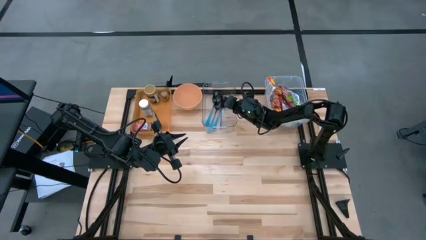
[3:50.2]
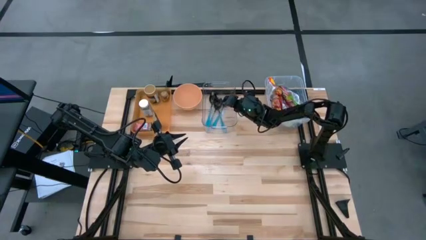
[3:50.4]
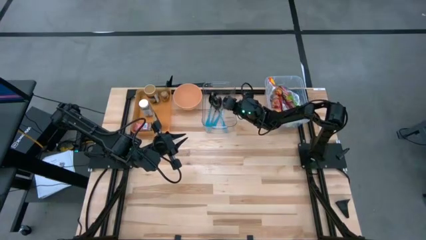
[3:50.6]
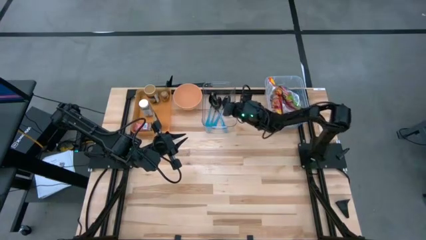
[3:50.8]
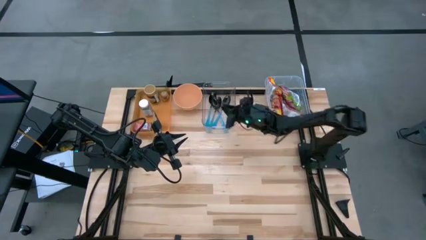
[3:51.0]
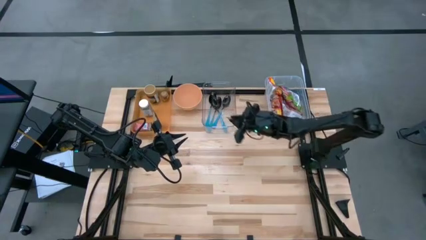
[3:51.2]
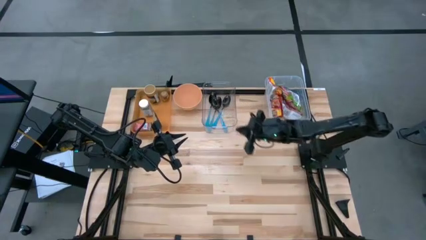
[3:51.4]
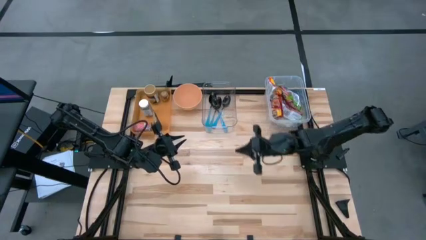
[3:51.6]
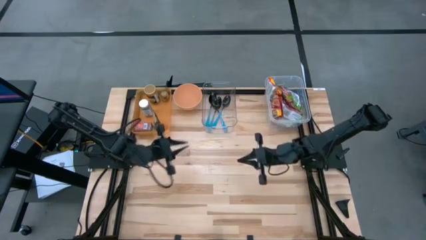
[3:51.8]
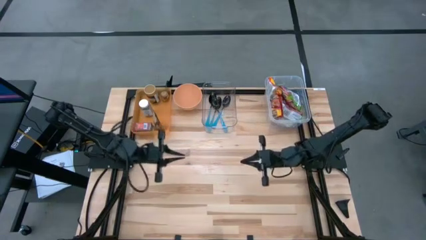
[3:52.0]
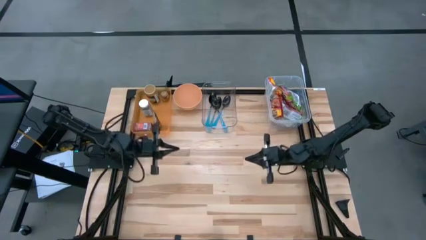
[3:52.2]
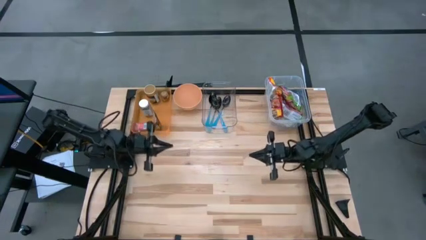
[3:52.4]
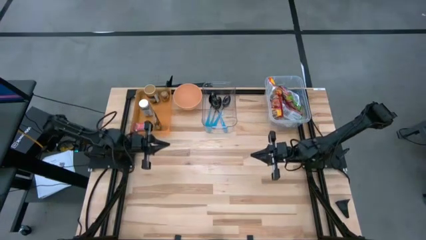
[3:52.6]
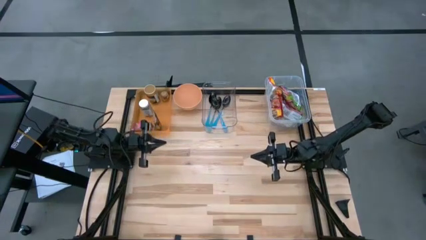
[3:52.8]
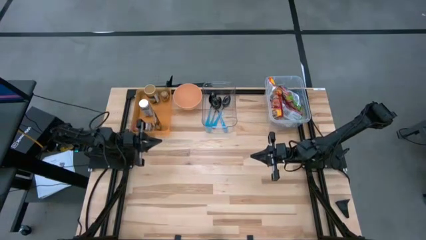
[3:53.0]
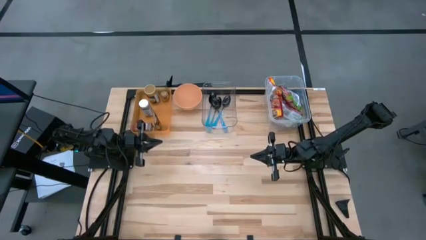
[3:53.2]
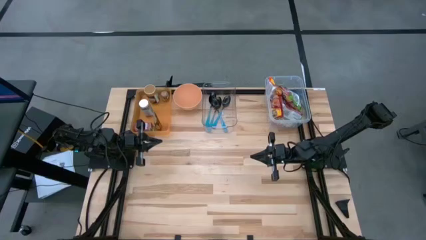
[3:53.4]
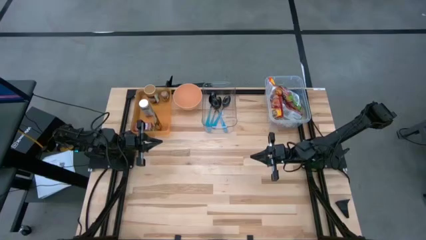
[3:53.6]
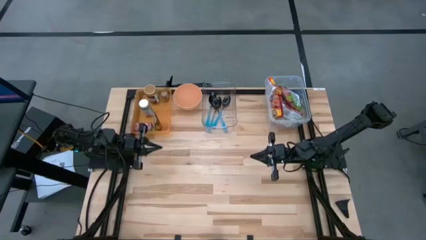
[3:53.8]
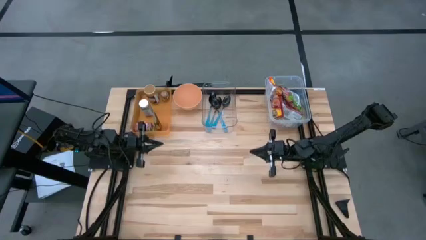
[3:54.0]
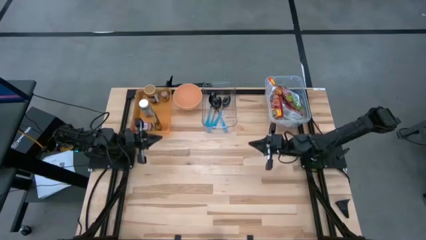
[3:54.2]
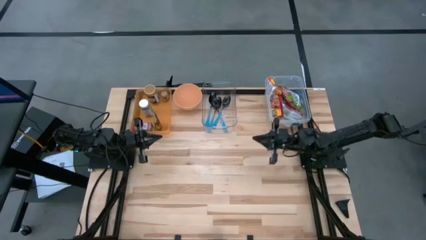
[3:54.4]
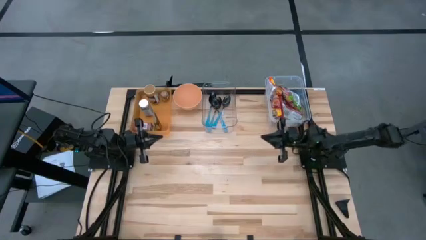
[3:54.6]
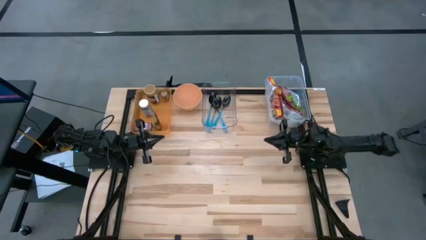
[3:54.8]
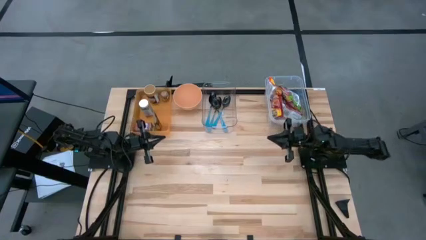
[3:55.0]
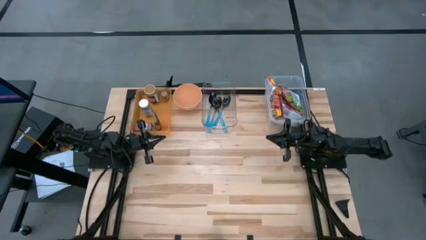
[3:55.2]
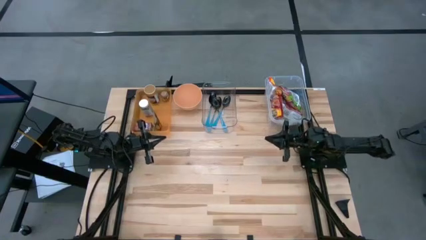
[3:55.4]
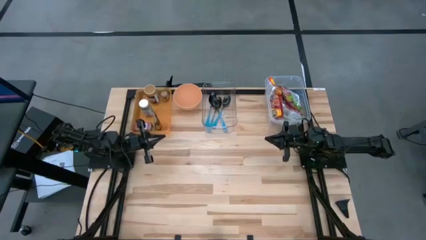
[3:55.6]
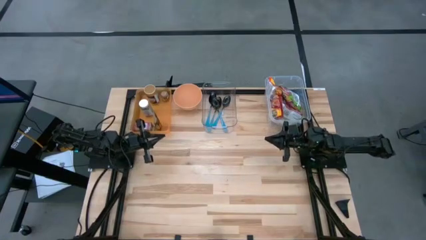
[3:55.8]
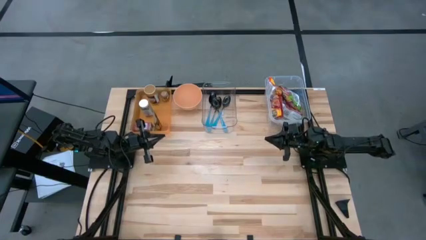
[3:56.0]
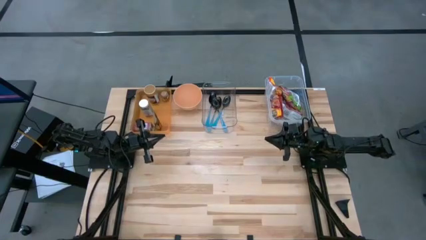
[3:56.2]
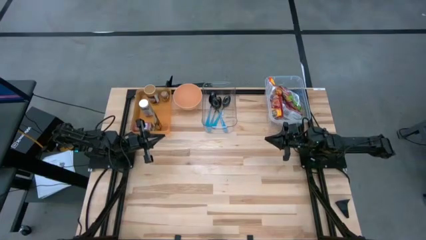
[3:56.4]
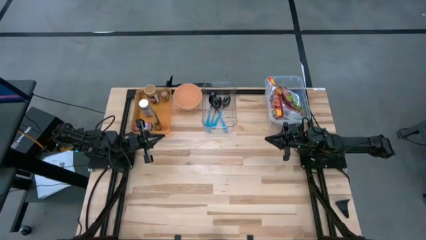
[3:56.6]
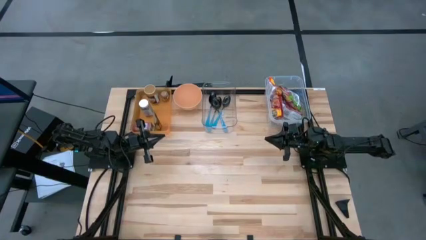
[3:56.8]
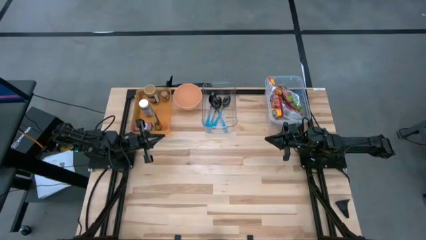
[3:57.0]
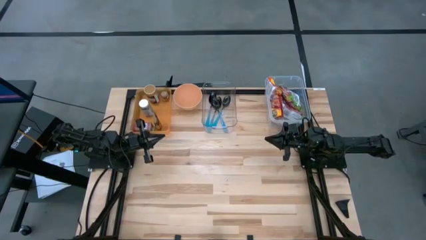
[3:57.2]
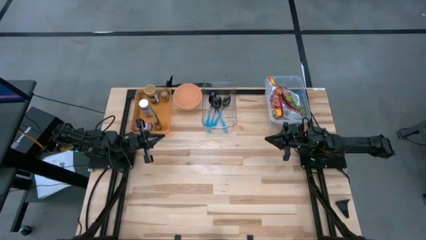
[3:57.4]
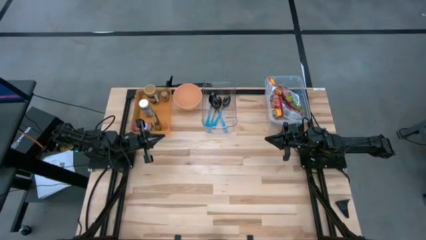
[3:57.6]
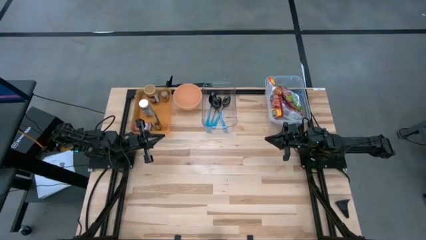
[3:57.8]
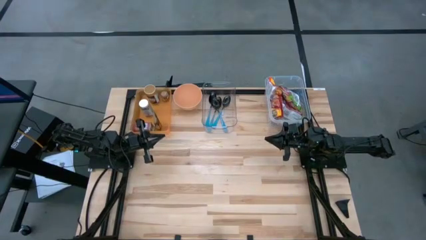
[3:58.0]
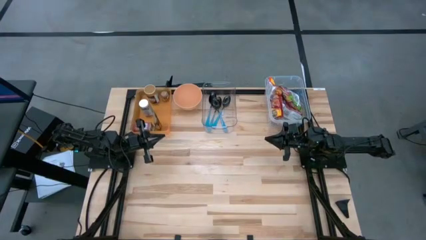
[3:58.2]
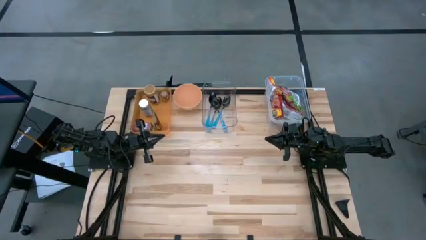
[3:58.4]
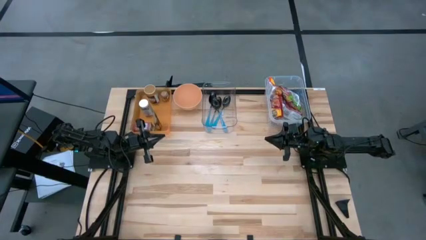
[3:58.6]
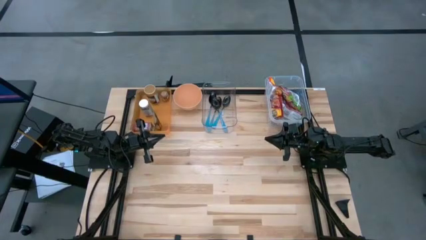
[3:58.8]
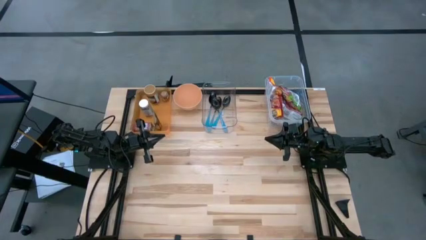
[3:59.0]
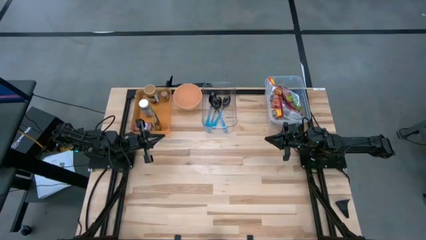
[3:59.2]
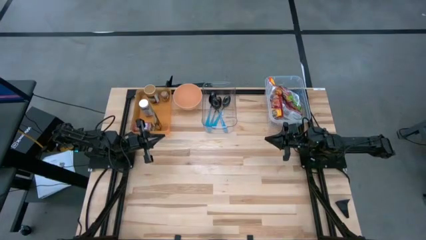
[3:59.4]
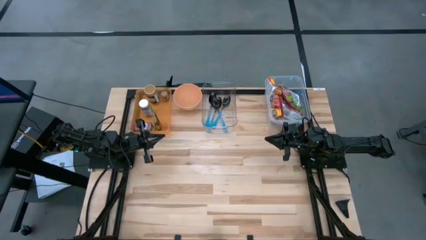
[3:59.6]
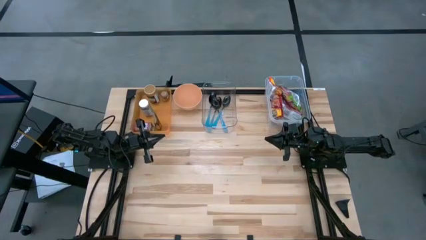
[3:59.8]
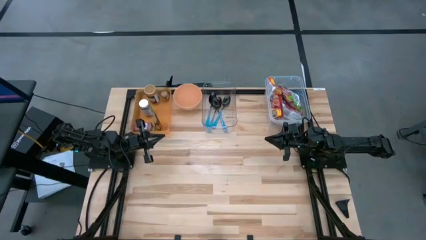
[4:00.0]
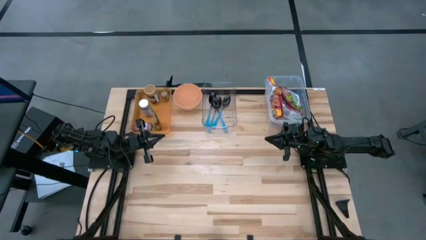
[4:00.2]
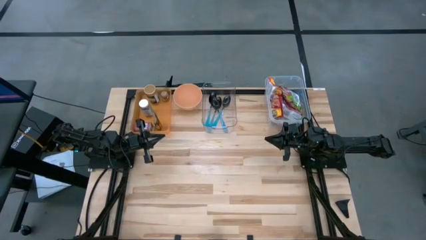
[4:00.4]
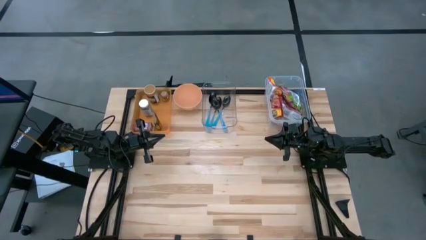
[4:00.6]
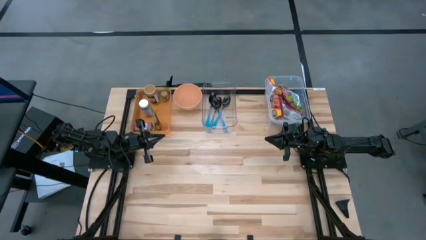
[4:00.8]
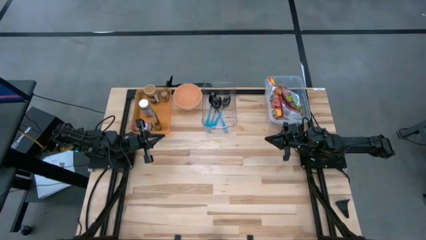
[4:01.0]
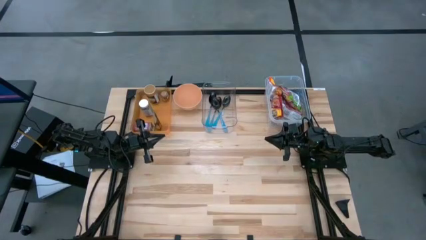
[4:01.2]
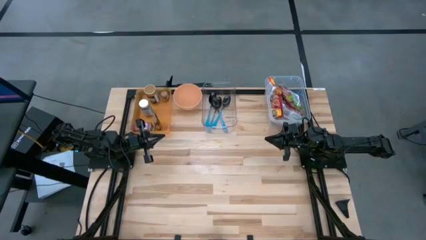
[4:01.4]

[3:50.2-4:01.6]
Task: Pick & Place Food Item
Return to Home Position
